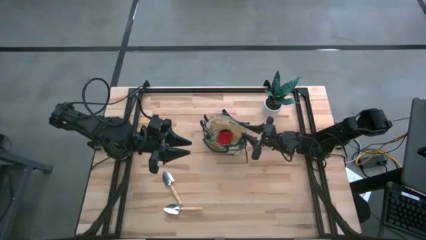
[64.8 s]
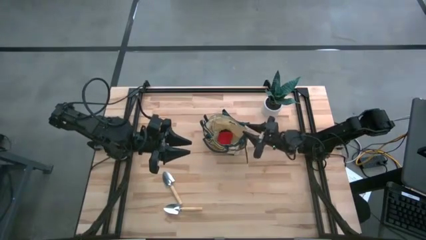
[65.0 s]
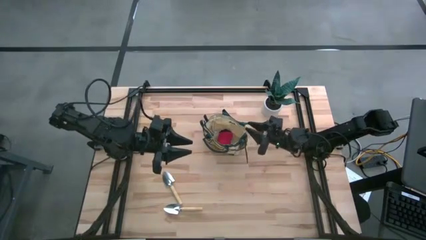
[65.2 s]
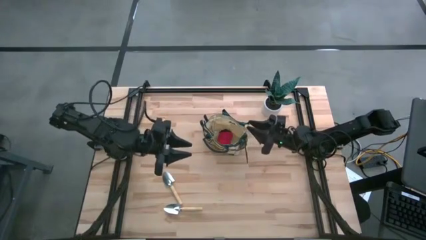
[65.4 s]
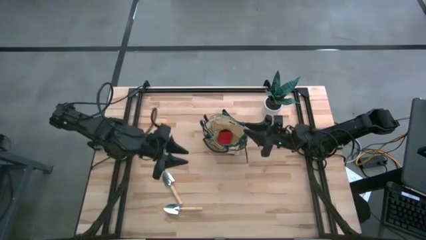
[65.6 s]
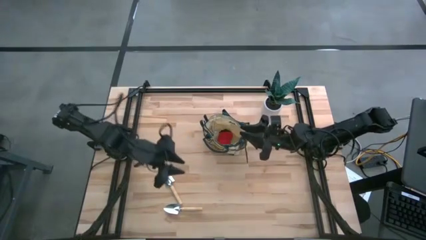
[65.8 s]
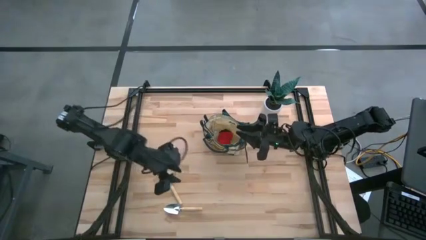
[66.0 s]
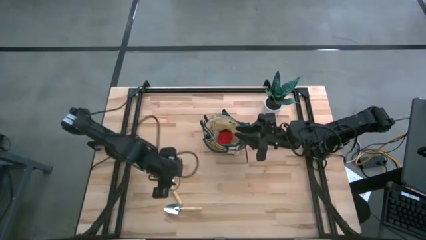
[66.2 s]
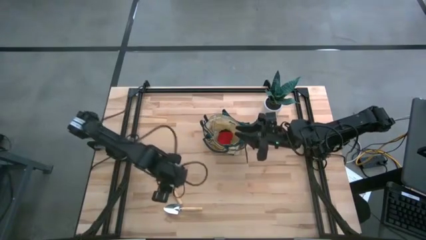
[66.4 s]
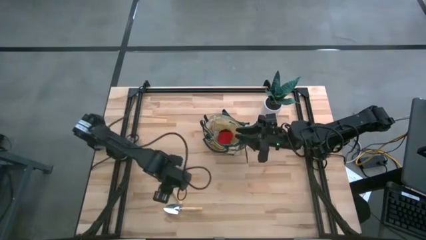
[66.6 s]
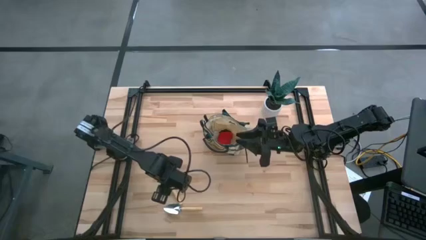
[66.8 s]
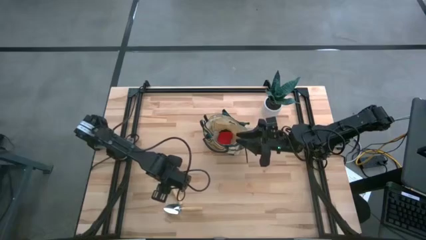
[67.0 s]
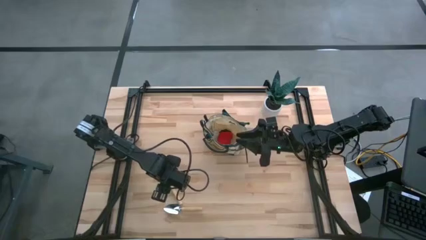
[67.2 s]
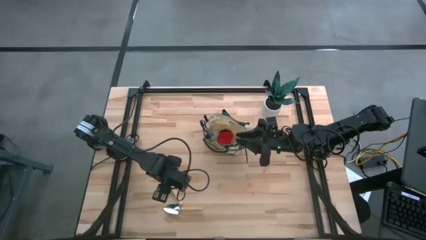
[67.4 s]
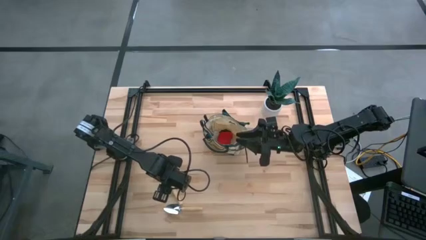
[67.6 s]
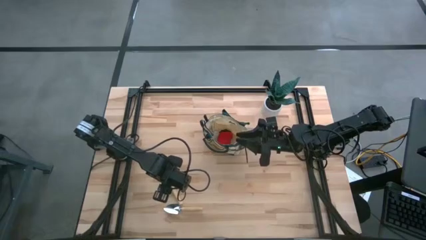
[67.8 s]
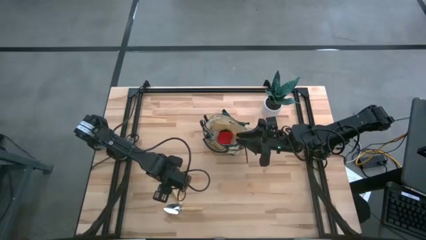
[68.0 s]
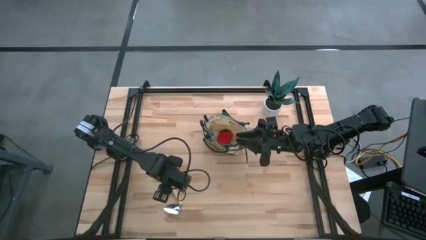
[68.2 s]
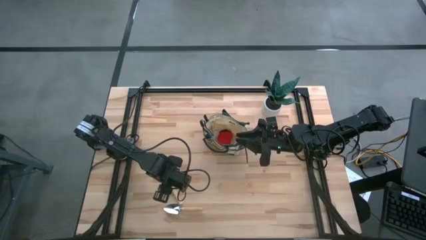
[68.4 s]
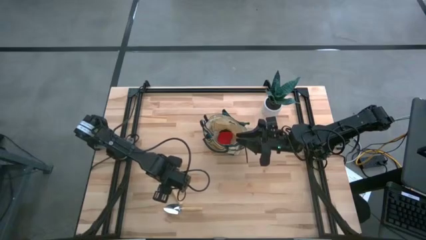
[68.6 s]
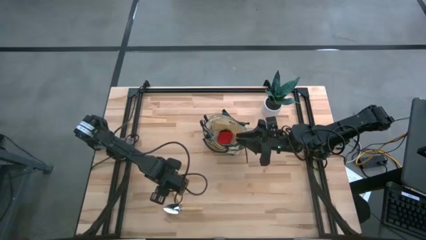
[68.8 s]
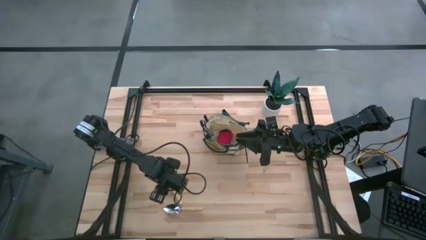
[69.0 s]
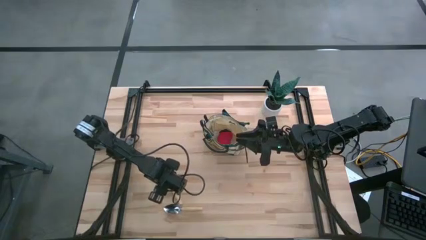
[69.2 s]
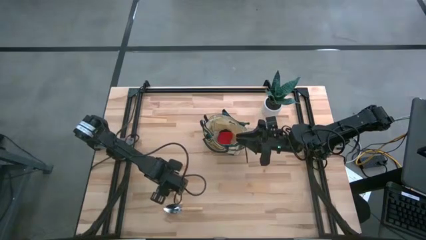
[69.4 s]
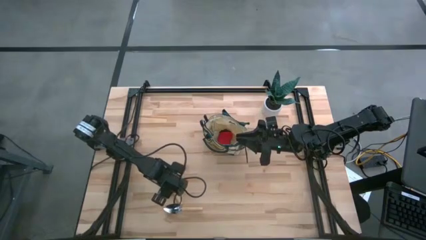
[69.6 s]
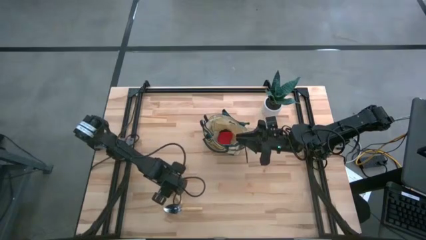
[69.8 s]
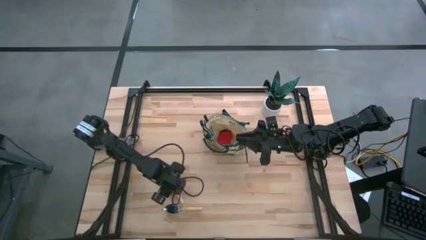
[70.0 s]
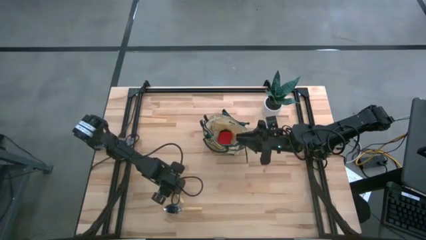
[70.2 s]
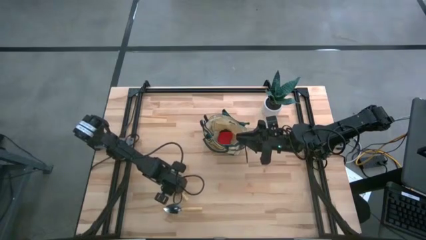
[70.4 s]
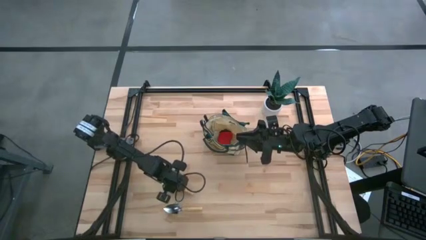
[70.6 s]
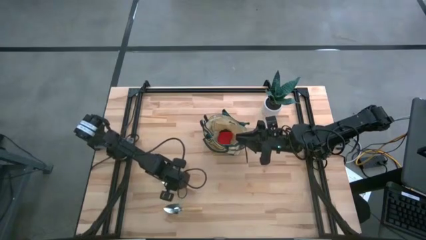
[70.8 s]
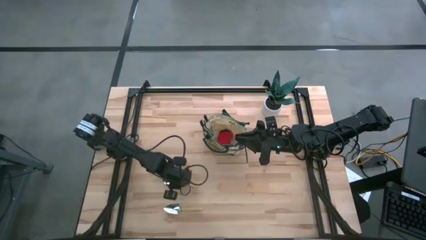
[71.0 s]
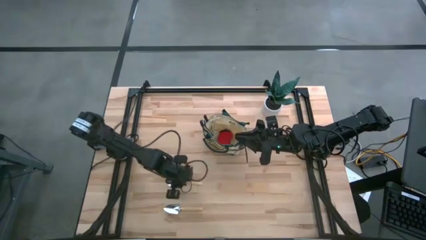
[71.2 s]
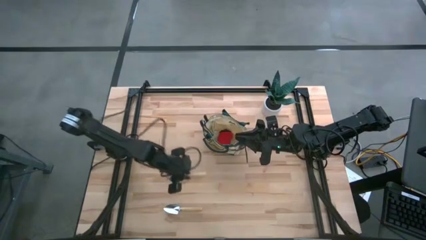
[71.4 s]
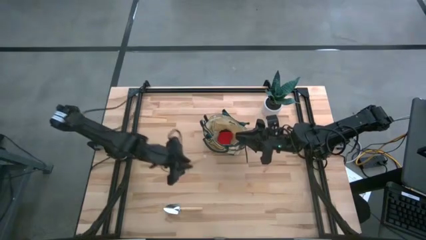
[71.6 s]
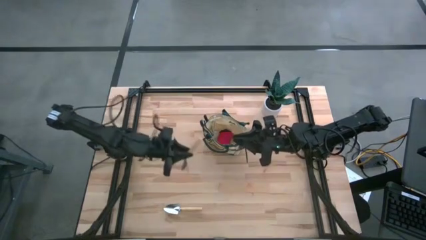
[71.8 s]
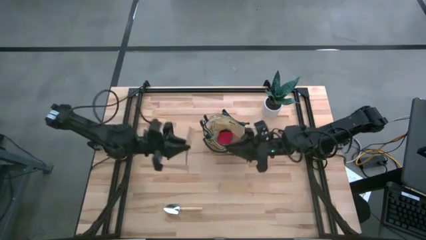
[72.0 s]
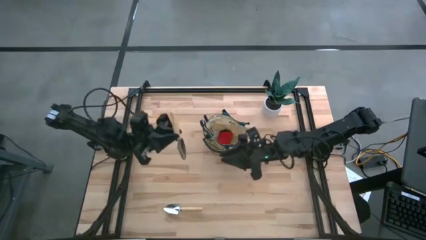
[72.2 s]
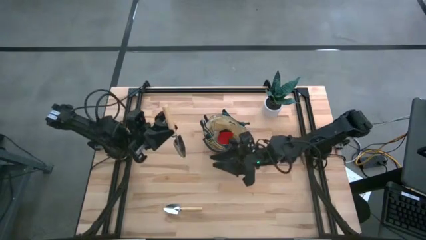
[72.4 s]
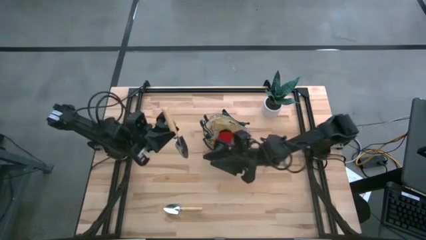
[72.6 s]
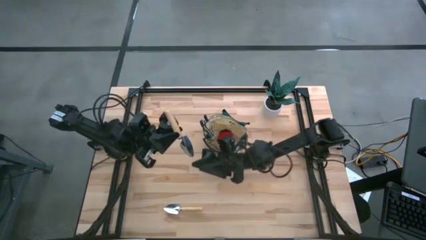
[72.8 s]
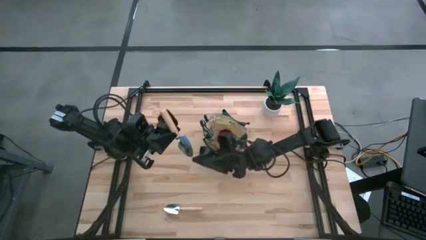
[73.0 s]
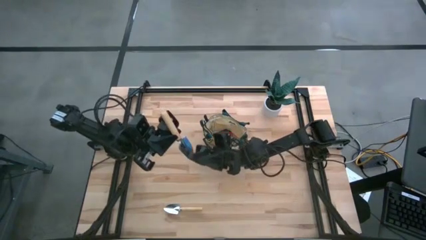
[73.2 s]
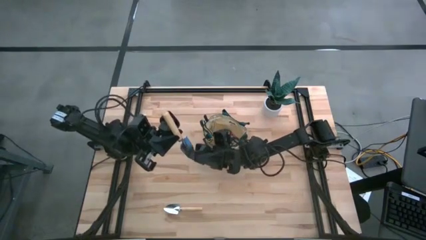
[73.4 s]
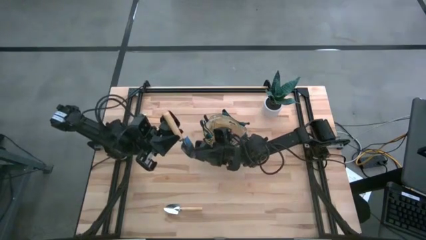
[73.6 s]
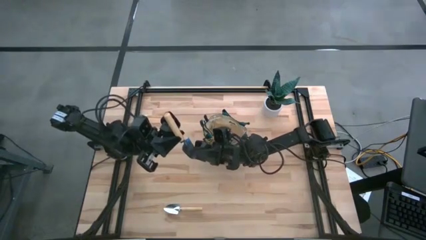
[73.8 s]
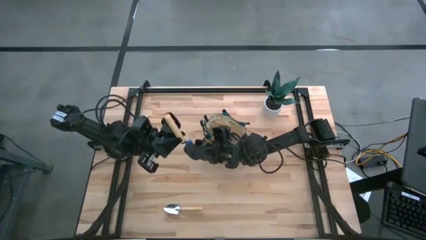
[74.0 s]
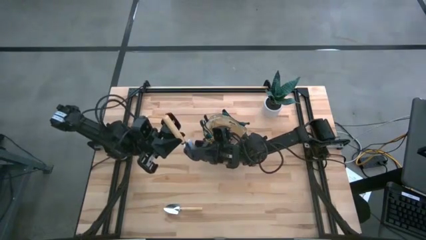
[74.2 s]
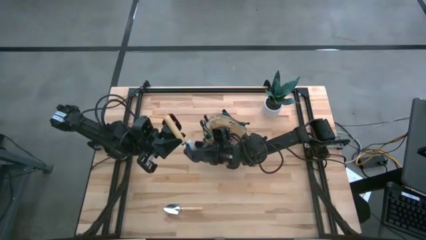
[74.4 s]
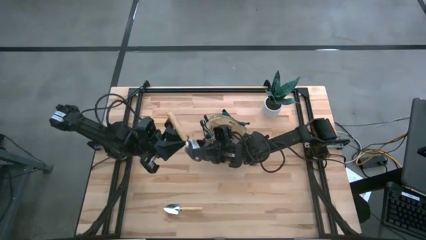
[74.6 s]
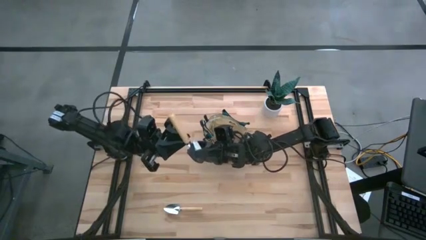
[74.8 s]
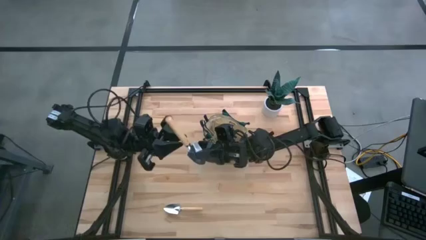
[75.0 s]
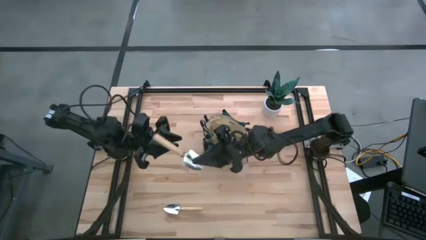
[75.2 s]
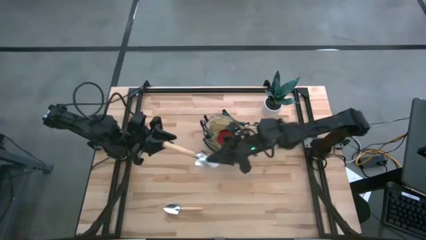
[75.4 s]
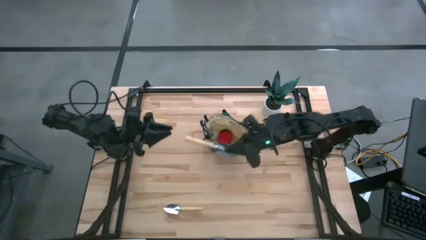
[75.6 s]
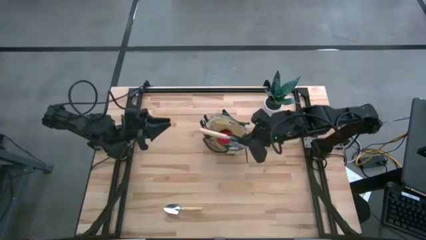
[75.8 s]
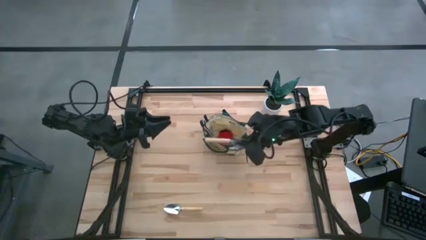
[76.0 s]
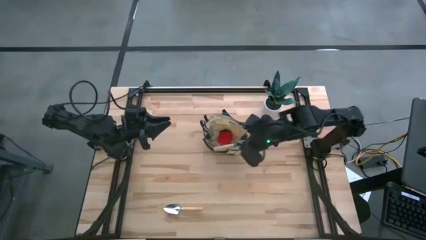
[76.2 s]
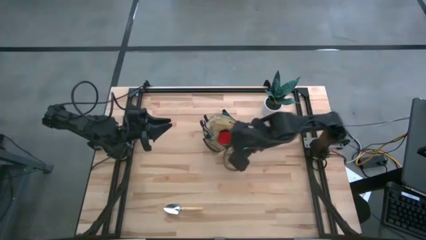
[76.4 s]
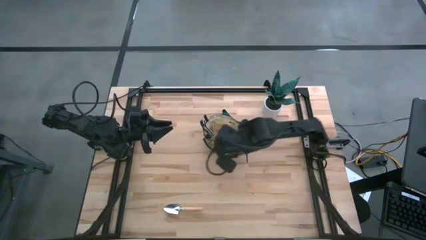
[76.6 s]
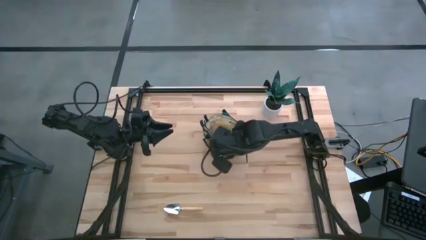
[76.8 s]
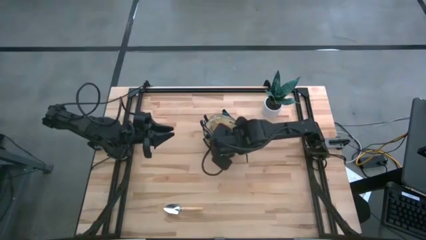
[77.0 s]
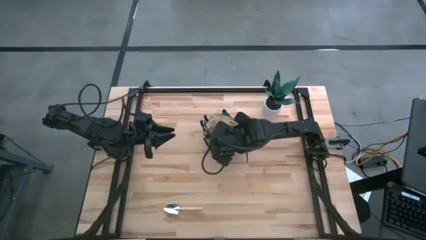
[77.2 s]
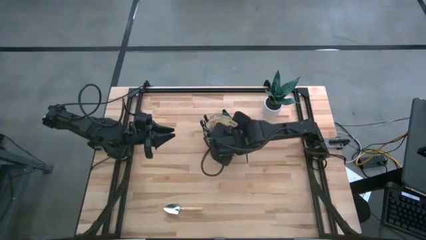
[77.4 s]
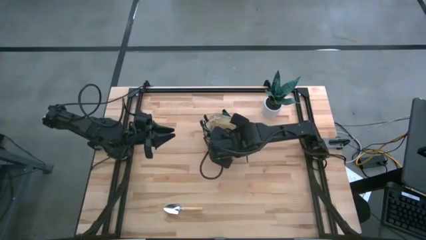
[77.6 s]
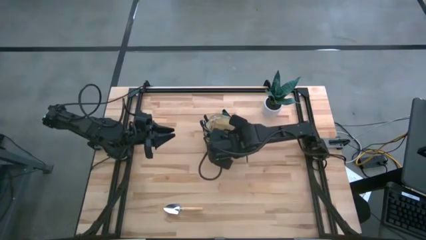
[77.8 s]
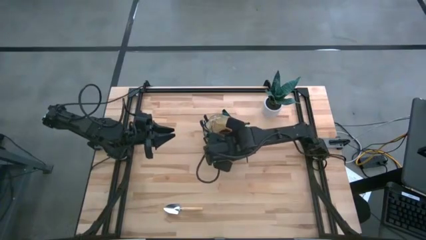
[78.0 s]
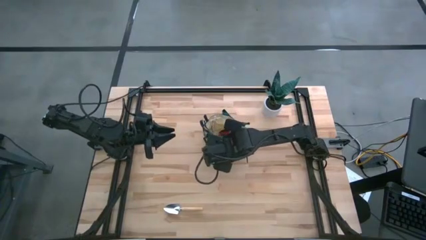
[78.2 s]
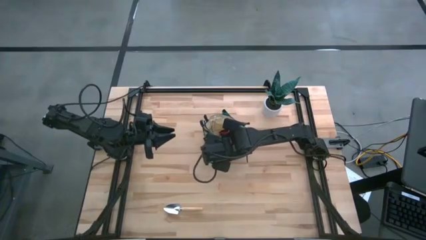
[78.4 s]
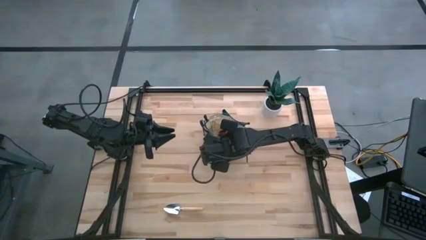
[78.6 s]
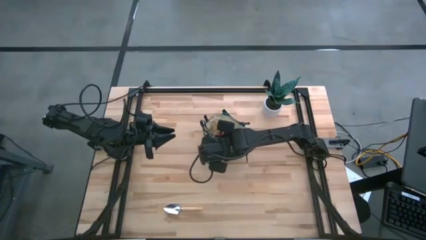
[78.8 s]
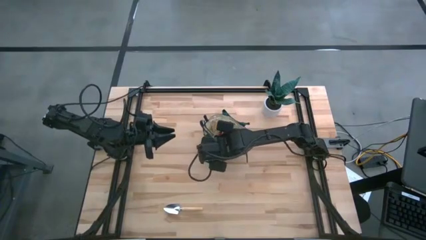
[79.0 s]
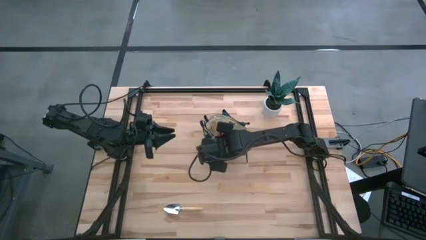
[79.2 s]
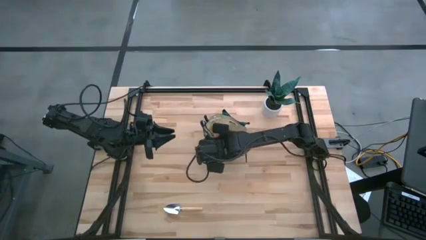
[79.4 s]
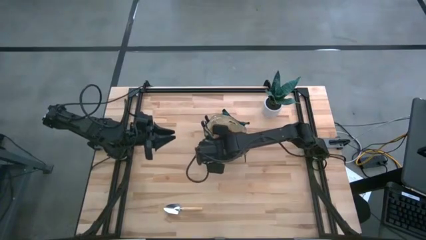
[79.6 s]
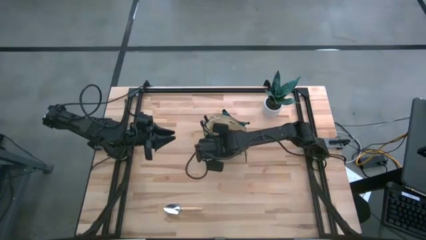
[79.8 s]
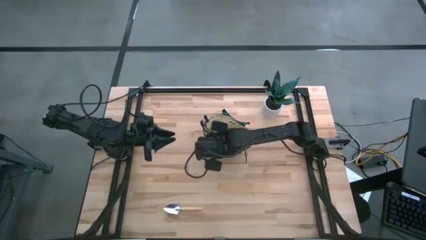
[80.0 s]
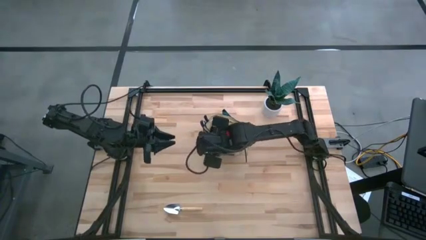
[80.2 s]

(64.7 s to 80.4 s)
Task: Pick & Place Garden tools in Gardening bag
Put the top trowel into the front bag pocket

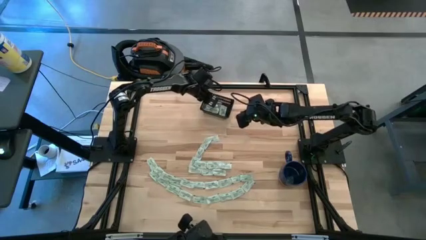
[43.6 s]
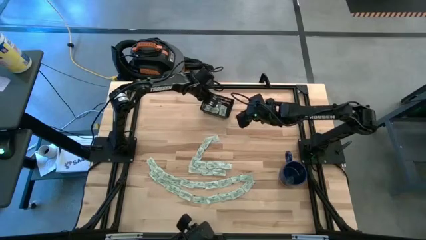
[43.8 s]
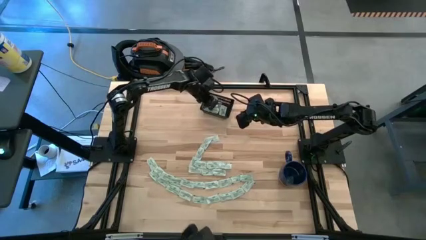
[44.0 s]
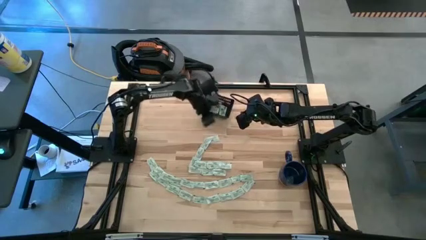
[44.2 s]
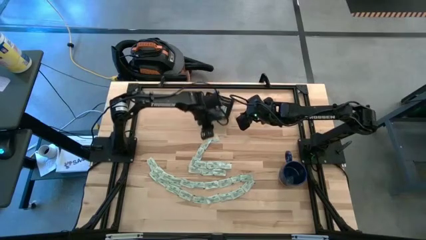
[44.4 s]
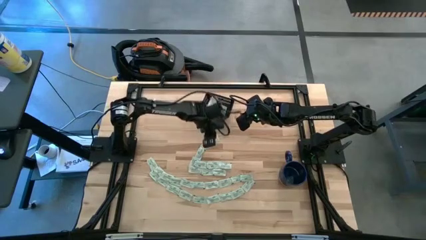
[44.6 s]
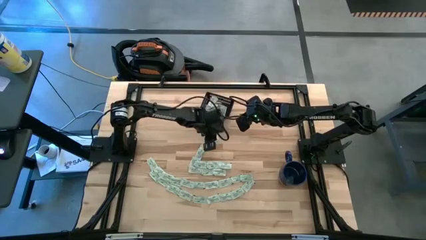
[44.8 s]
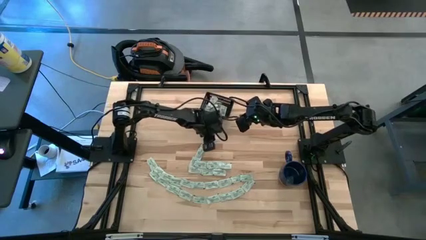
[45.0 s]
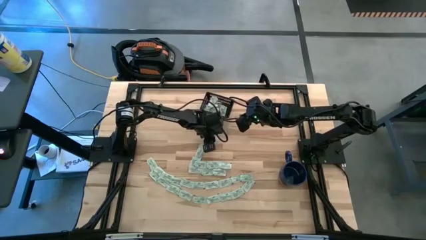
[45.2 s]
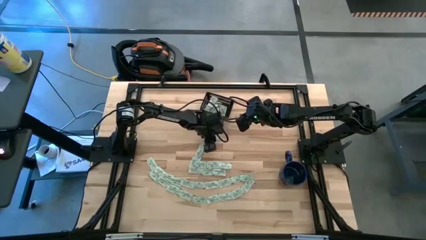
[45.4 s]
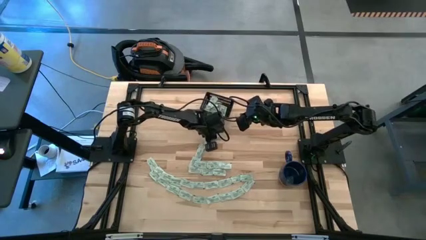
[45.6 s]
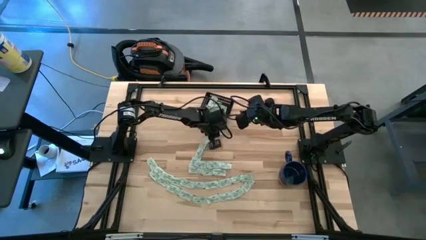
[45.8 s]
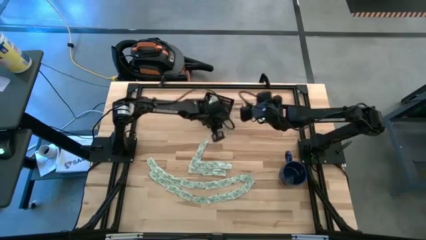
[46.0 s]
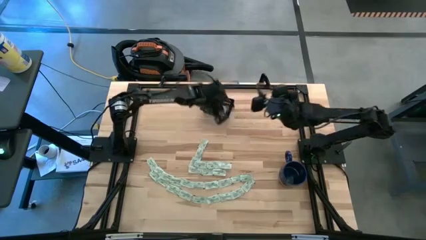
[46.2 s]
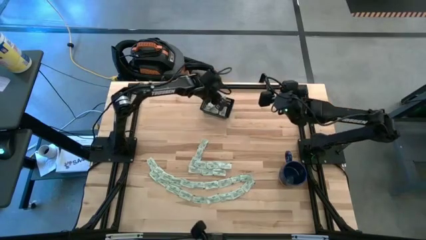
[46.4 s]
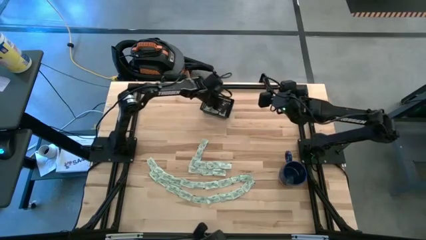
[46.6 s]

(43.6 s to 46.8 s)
Task: Pick and place Stevia / Truvia into bins
Put the stevia packet into the black bin
